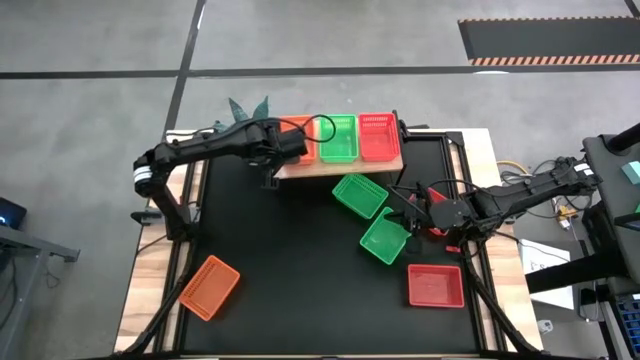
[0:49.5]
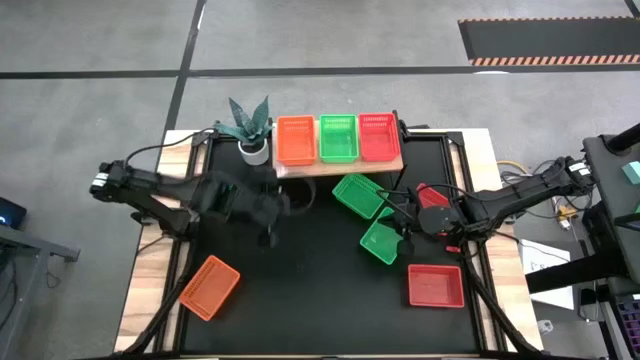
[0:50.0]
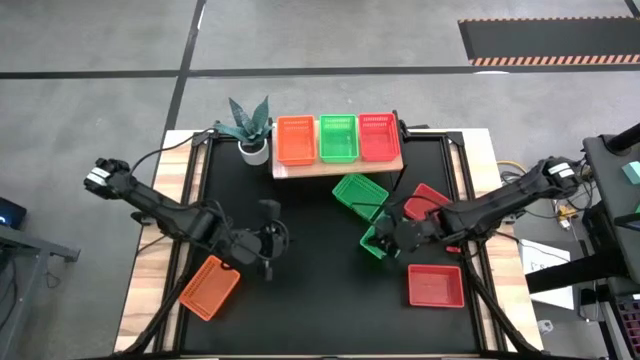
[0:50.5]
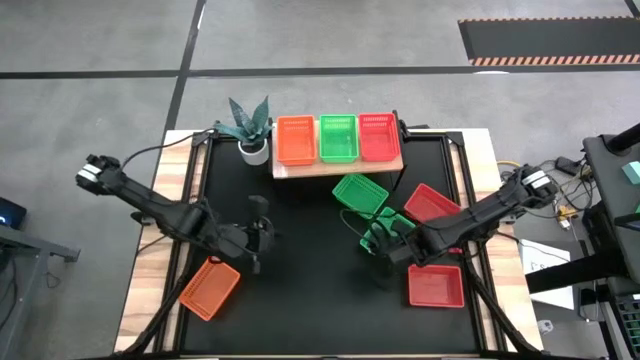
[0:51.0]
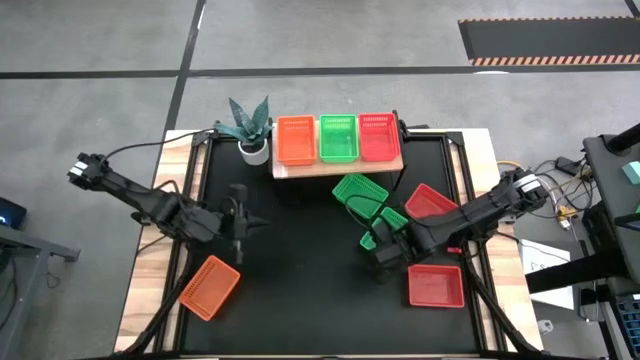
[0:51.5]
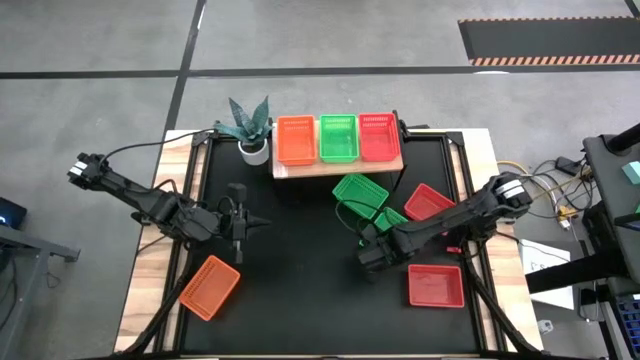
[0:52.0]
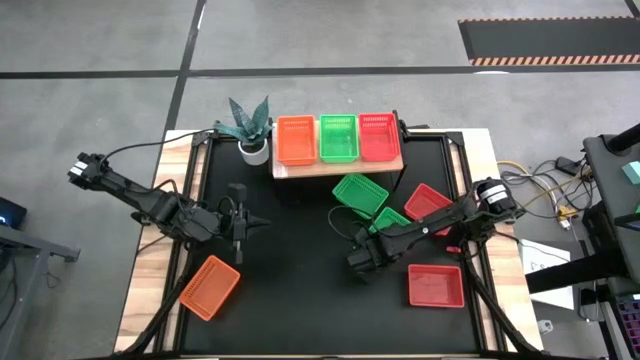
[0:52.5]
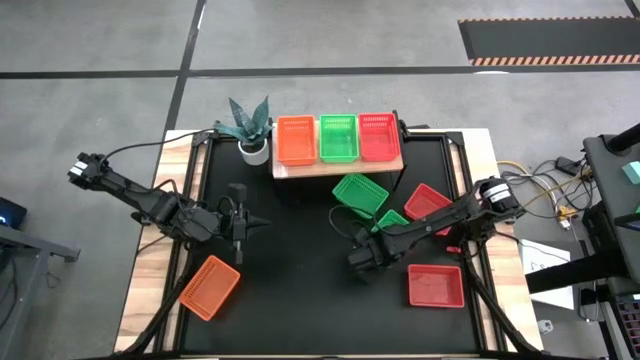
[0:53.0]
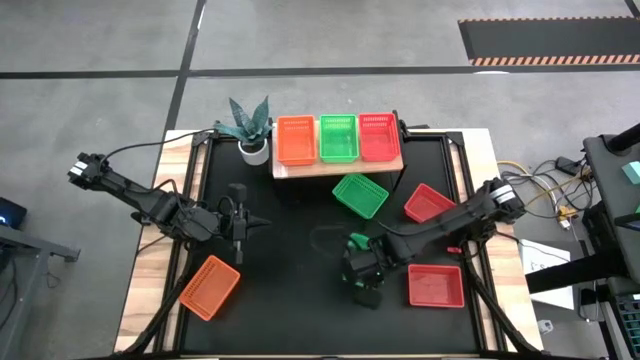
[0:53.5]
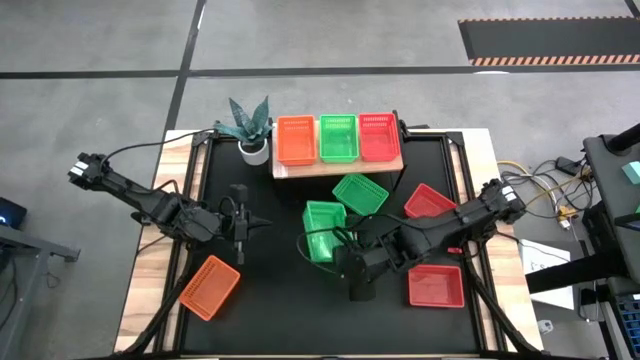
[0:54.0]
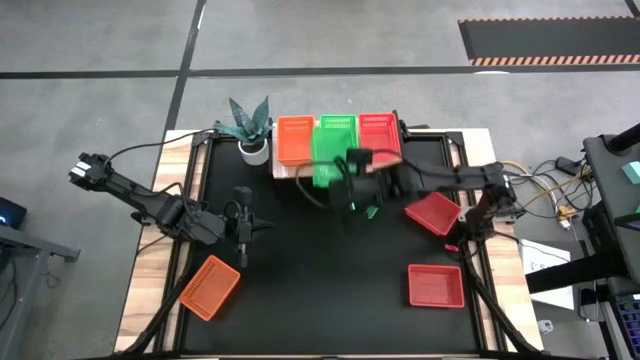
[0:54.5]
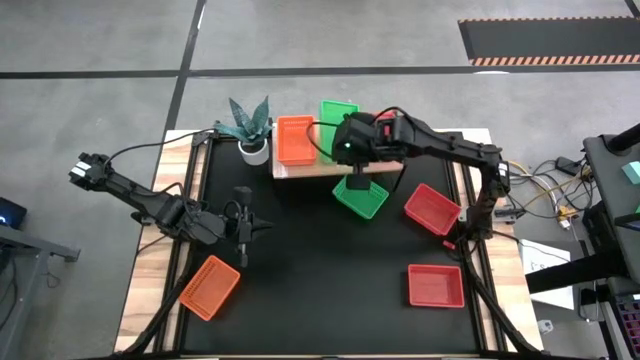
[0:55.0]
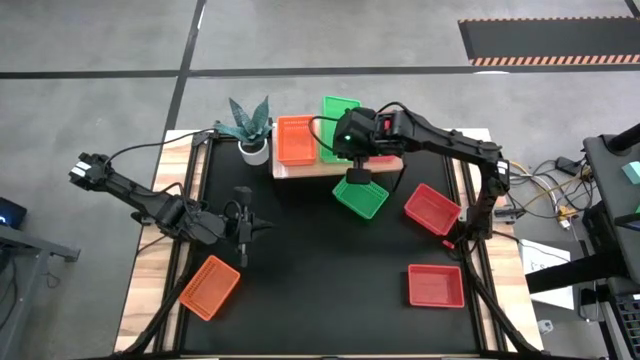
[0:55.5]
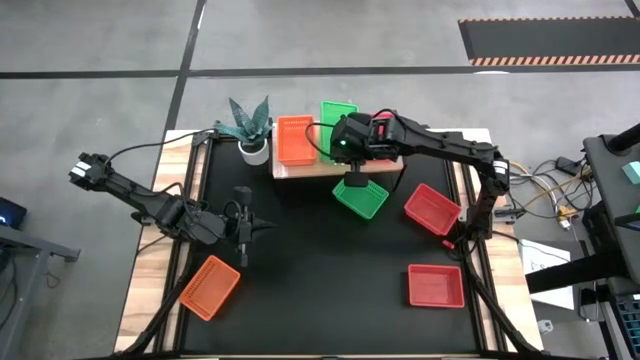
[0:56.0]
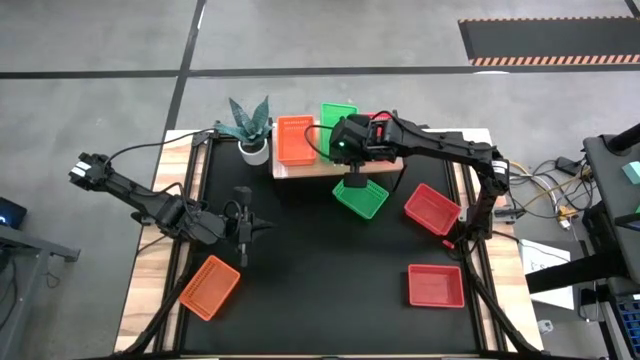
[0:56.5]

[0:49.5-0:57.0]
Task: Stack baskets on shelf by color
Stack the bottom green bin on top of the green bin on the shelf

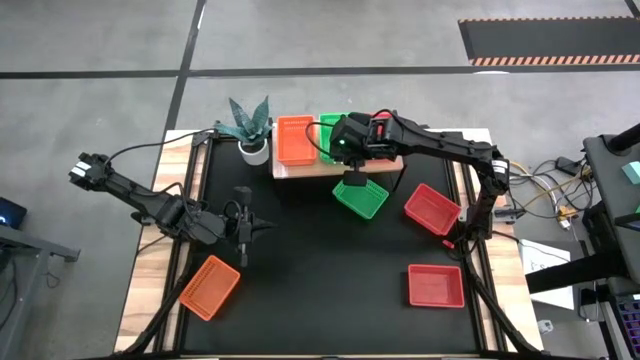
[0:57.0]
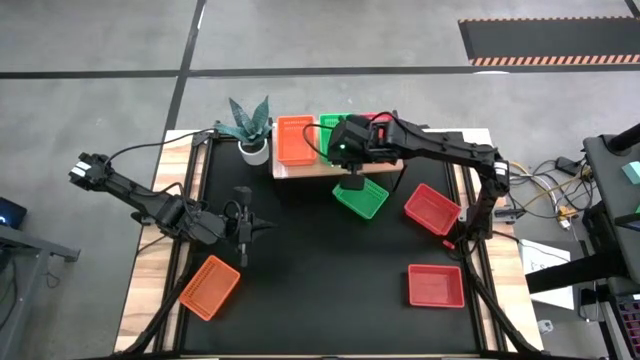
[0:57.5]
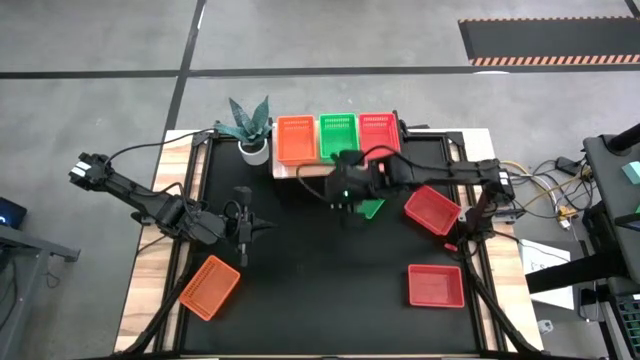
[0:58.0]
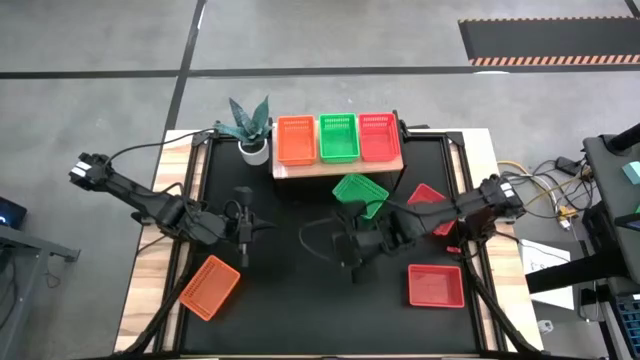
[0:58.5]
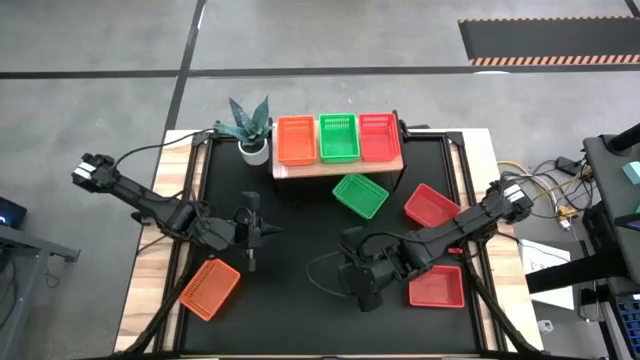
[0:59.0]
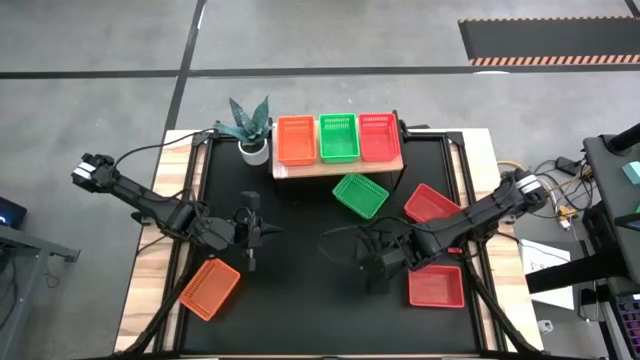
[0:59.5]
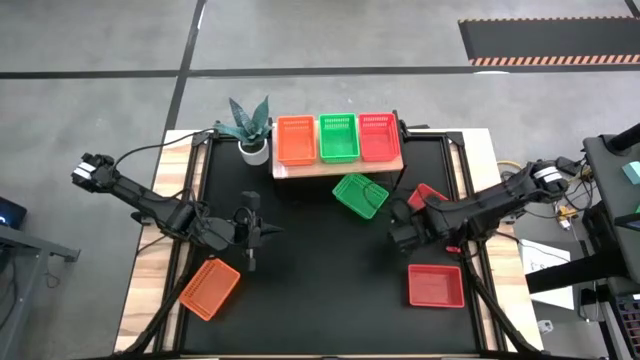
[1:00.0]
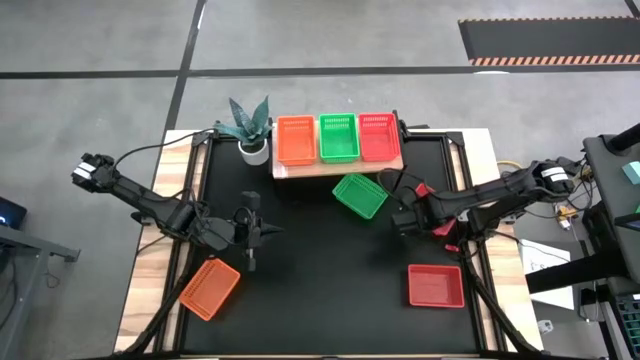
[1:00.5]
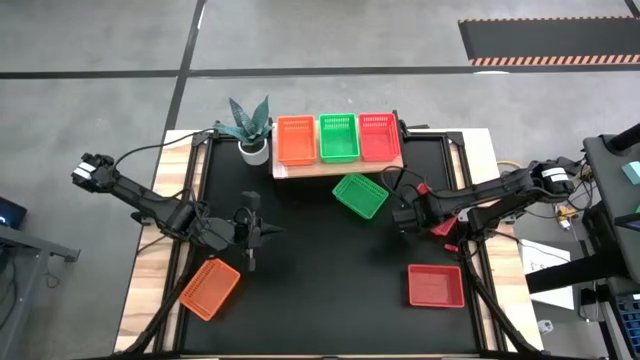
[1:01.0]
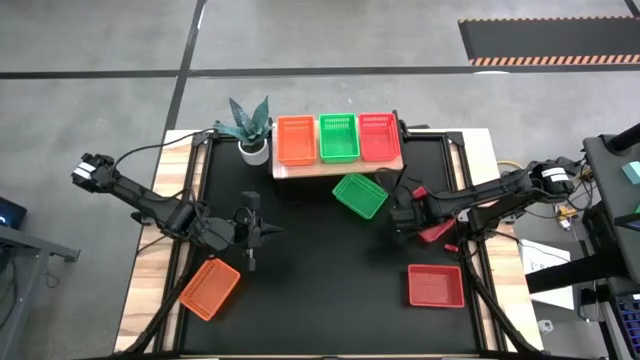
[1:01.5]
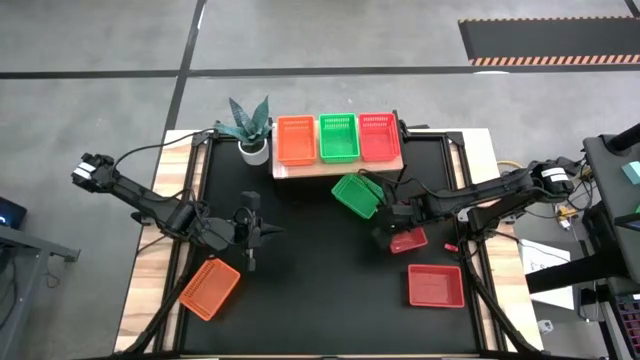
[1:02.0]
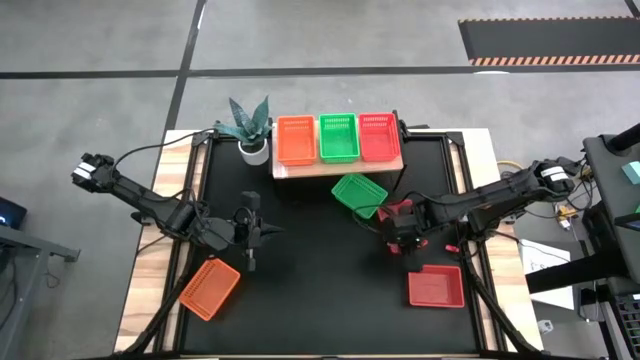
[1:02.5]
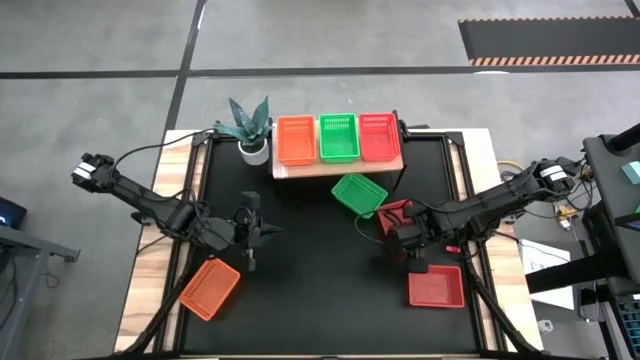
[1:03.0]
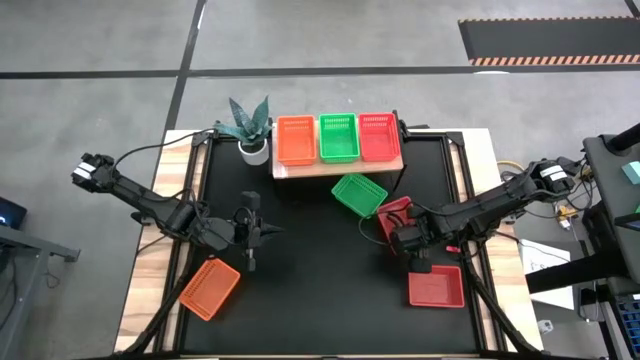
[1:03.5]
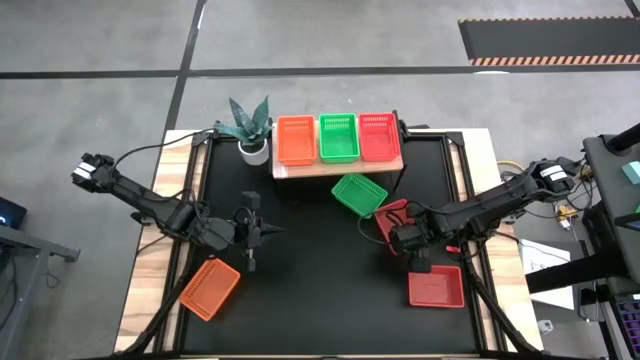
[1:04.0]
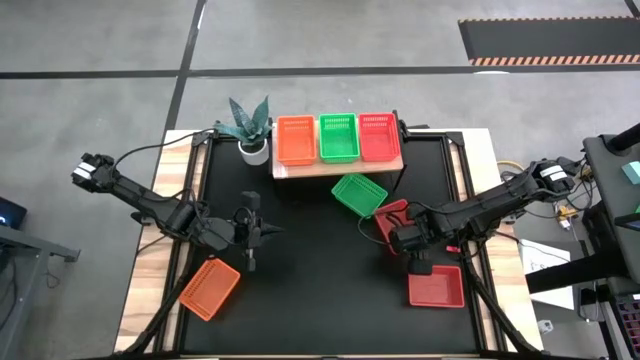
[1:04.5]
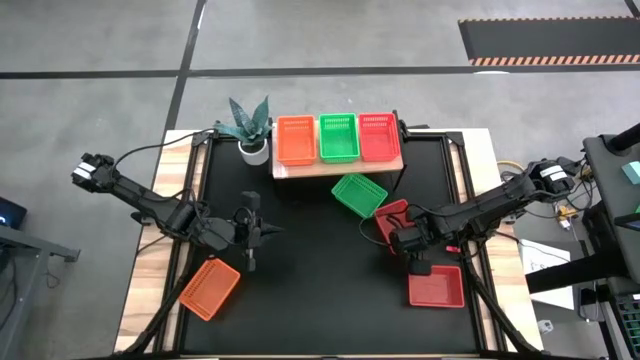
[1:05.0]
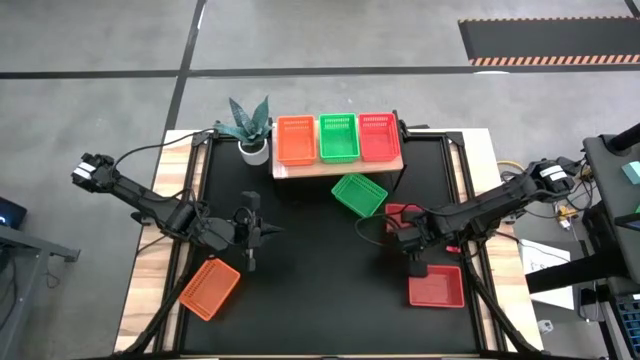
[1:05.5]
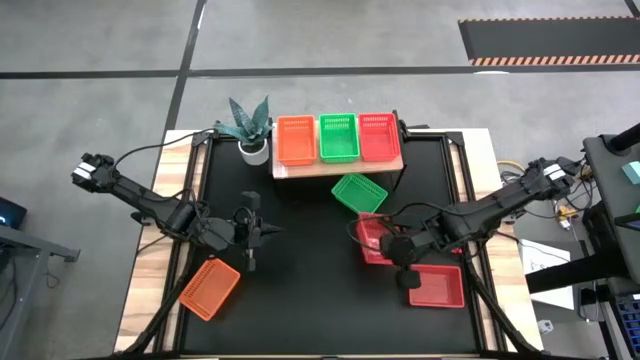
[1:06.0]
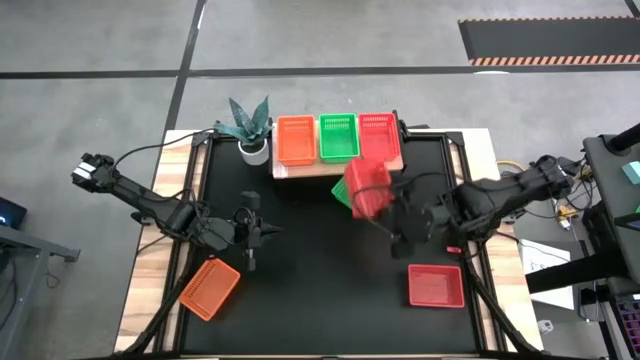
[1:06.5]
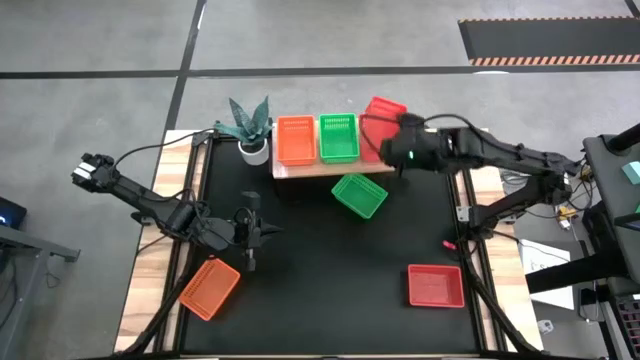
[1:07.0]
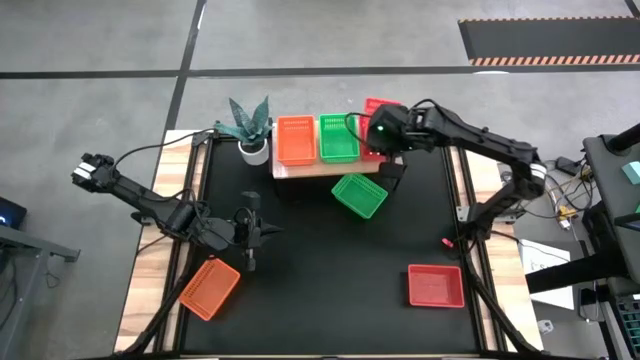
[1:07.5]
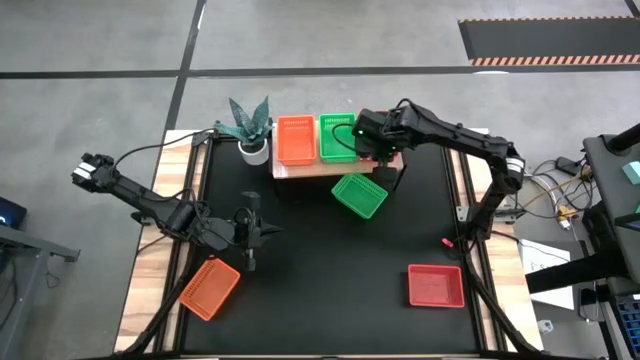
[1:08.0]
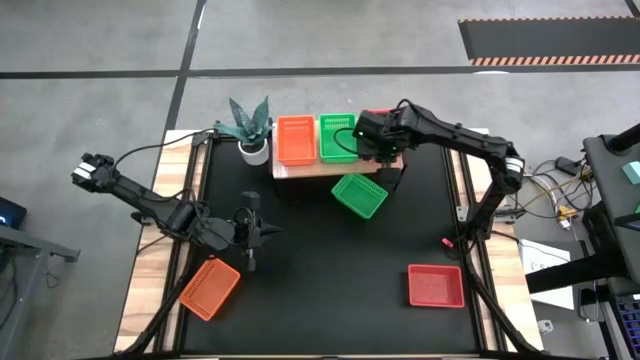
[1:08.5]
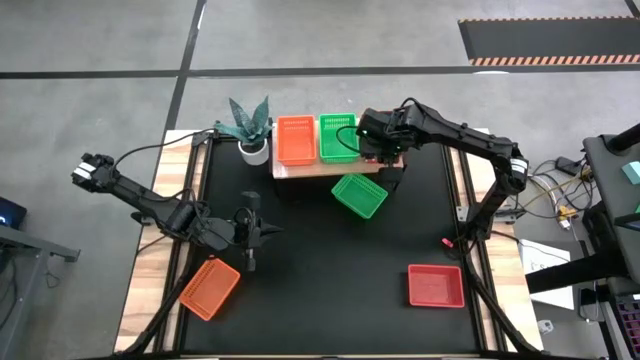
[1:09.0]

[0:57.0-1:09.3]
Stack the top red bin on top of the red bin on the shelf

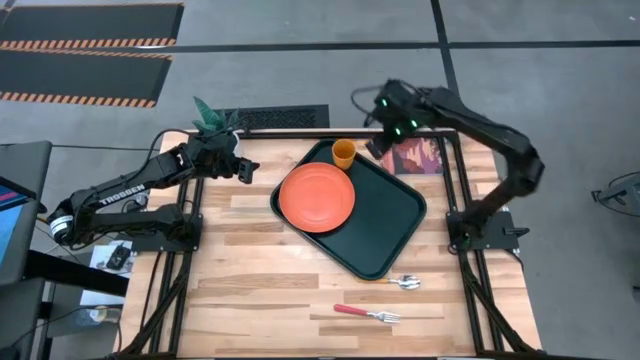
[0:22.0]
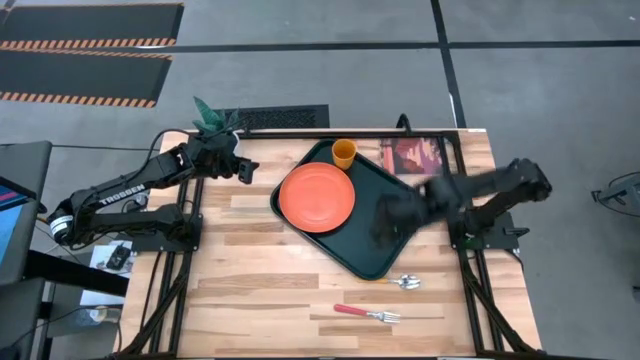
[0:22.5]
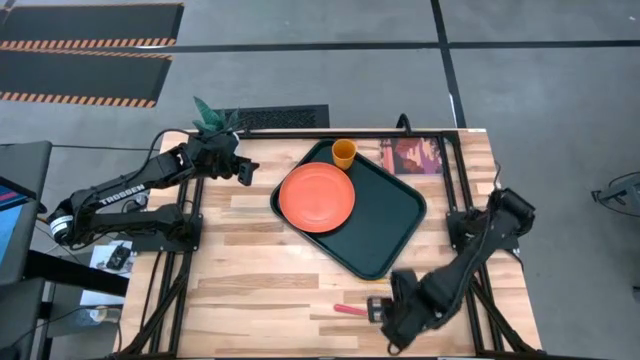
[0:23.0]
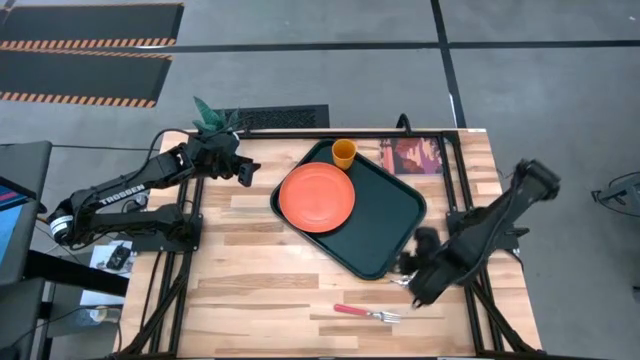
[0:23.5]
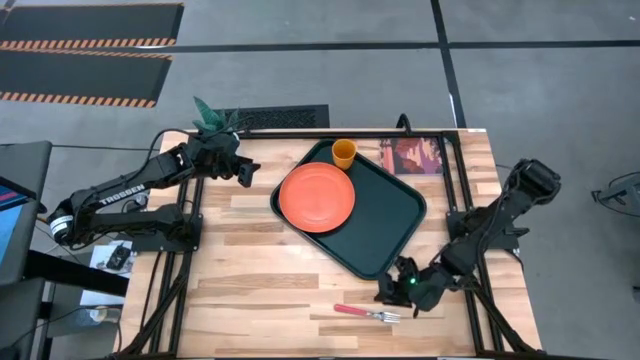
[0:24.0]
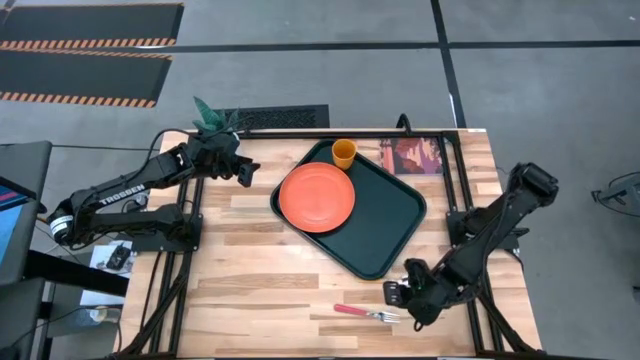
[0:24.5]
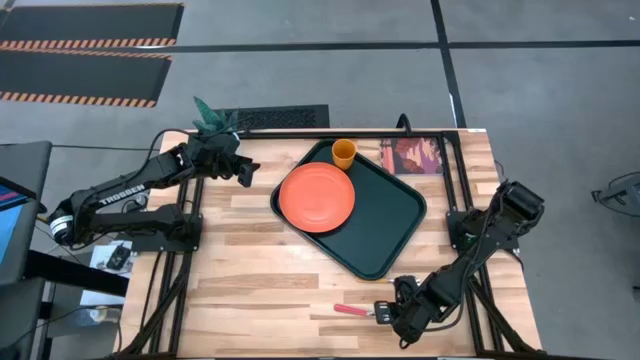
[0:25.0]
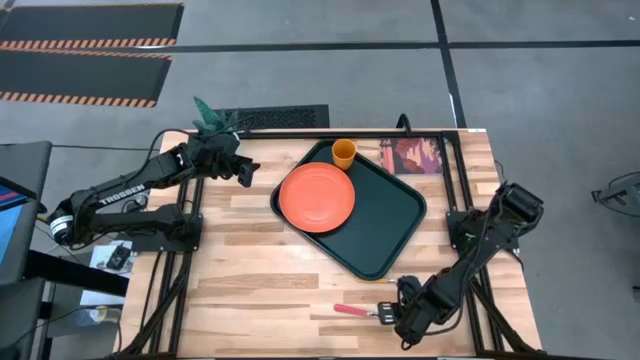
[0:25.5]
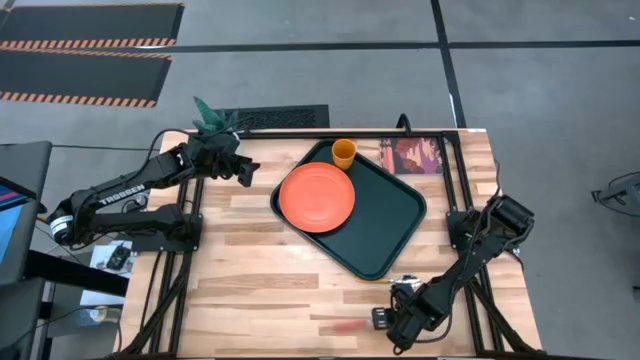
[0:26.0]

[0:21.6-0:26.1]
Task: Pick and place plate/cup/fork/spoon on tray
Put the pink fork on the black tray to the right side of the orange plate
